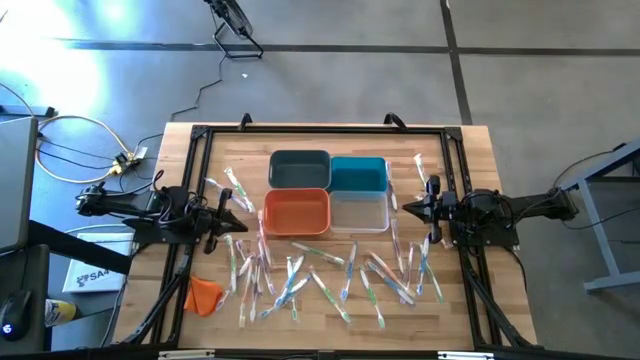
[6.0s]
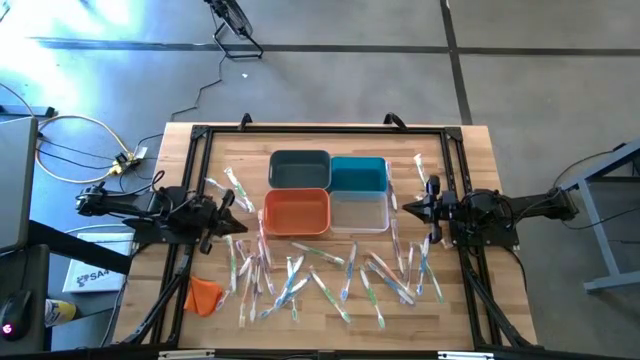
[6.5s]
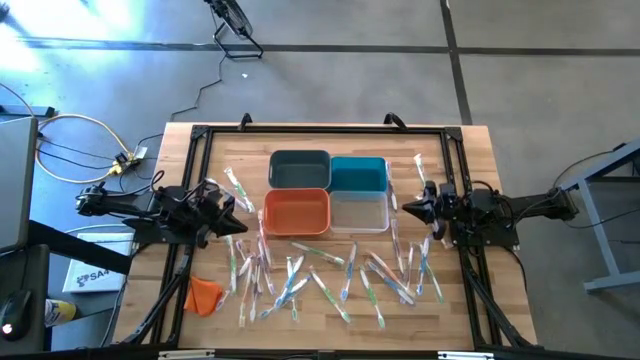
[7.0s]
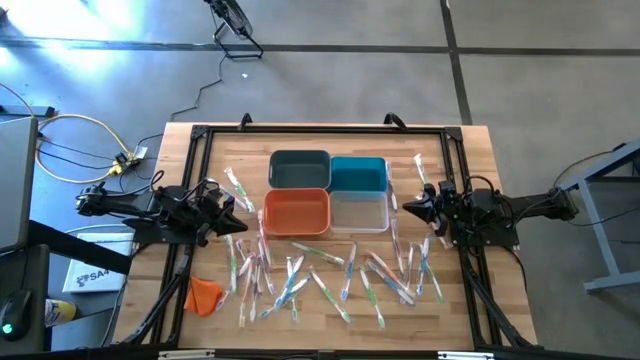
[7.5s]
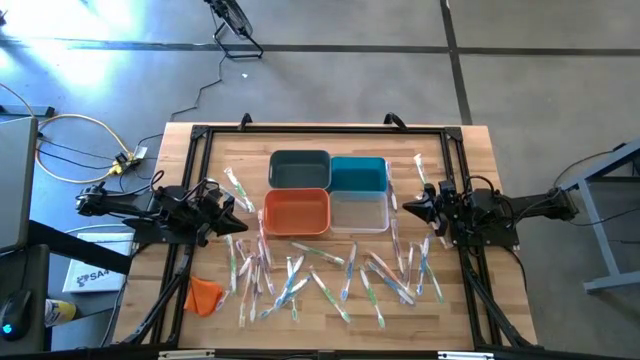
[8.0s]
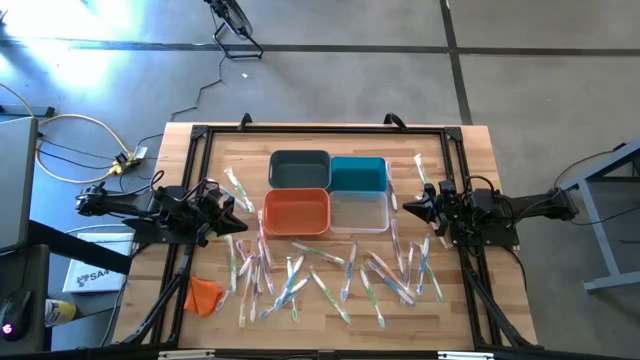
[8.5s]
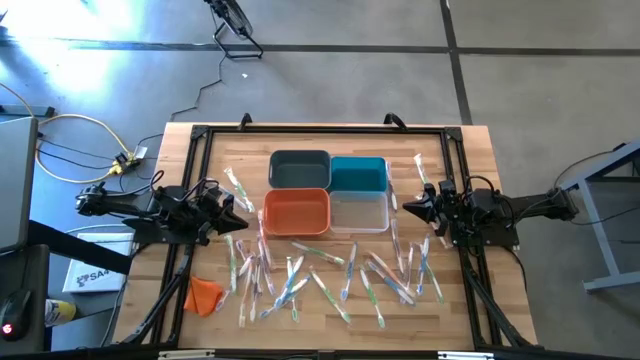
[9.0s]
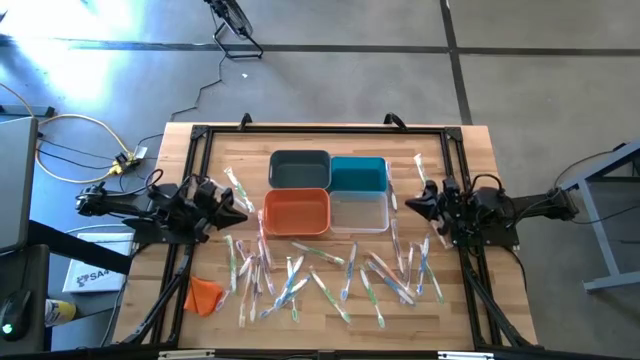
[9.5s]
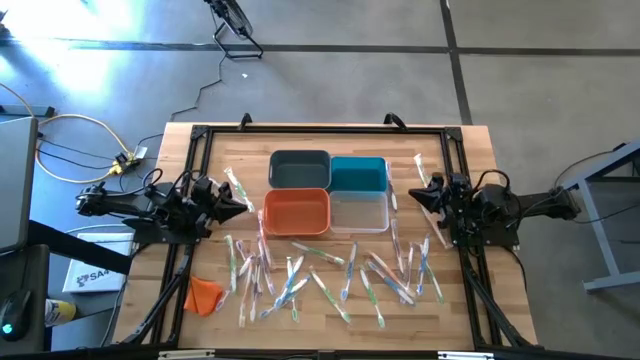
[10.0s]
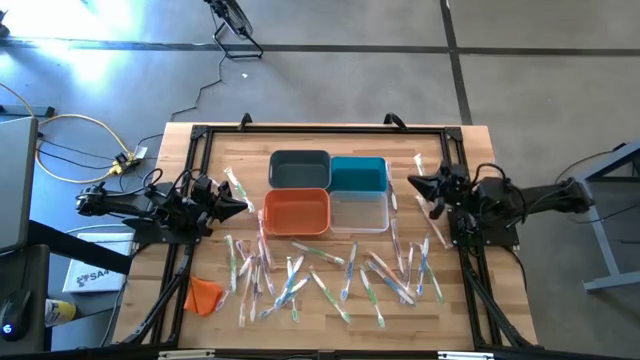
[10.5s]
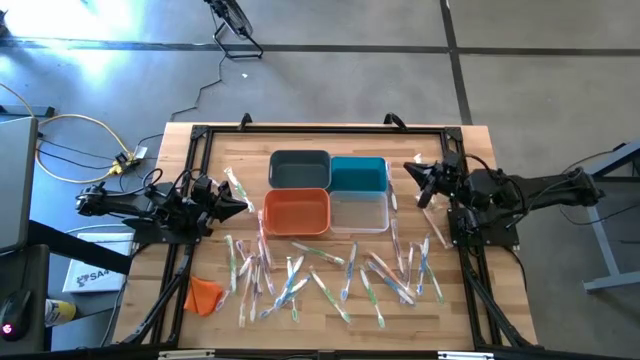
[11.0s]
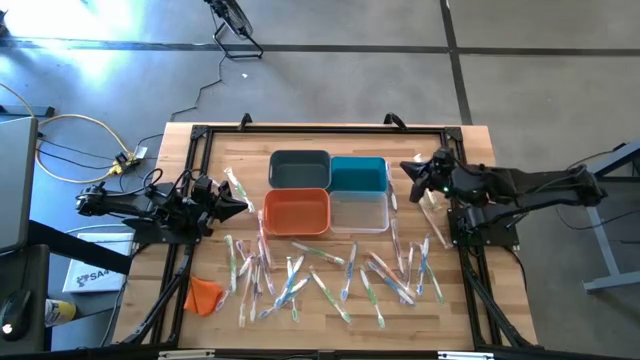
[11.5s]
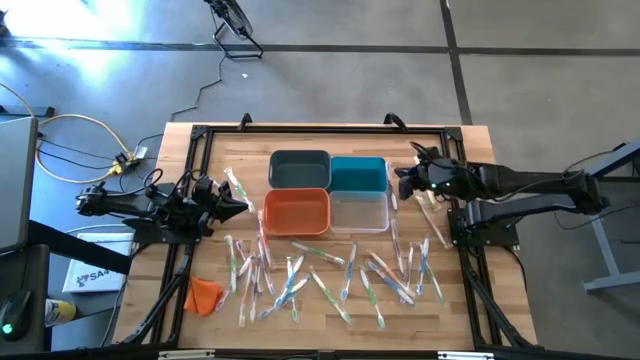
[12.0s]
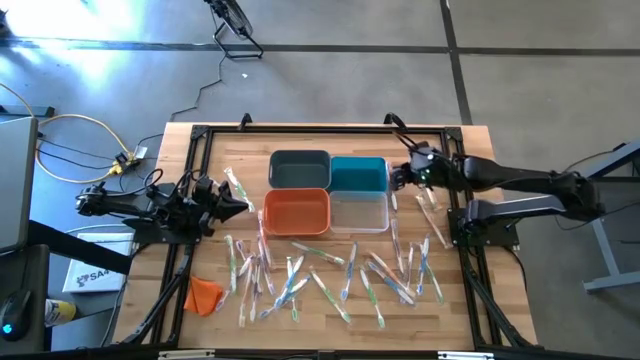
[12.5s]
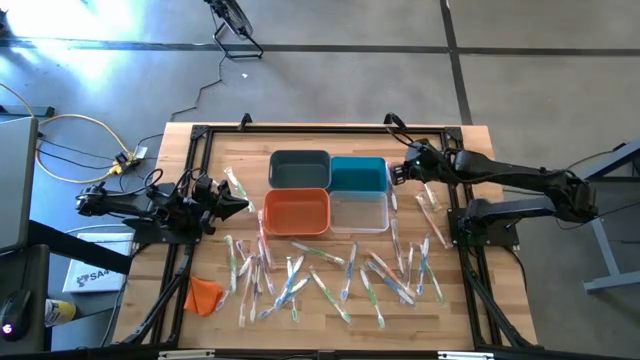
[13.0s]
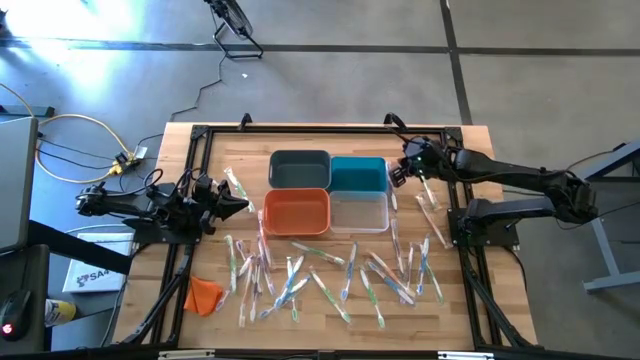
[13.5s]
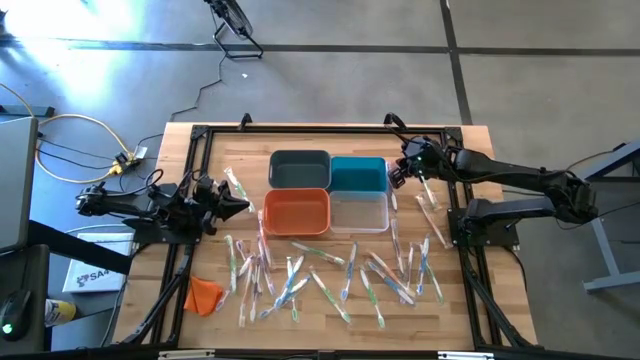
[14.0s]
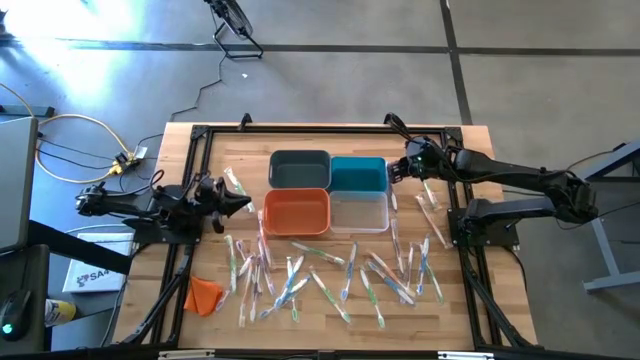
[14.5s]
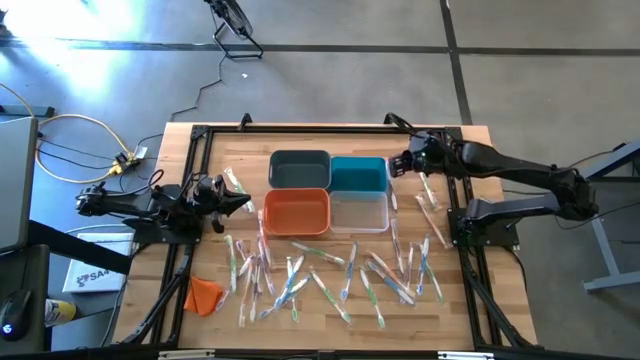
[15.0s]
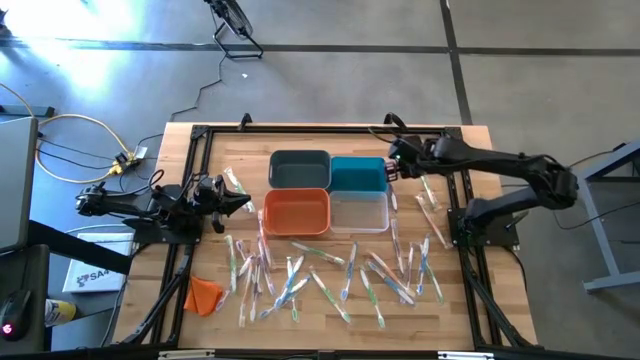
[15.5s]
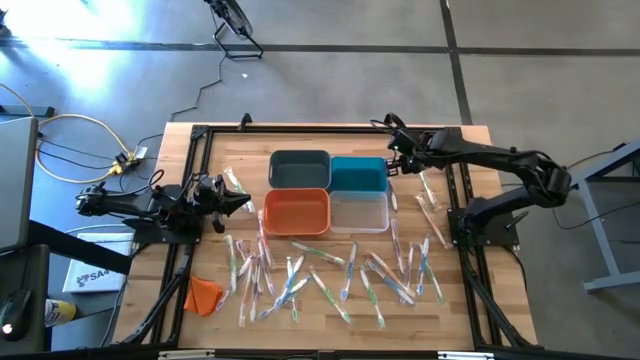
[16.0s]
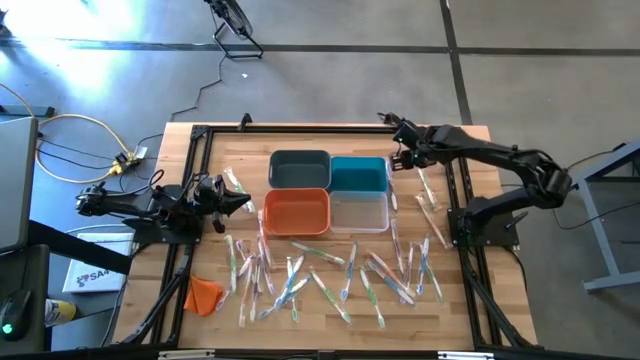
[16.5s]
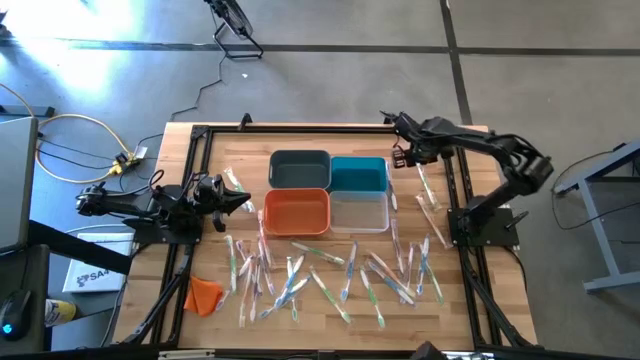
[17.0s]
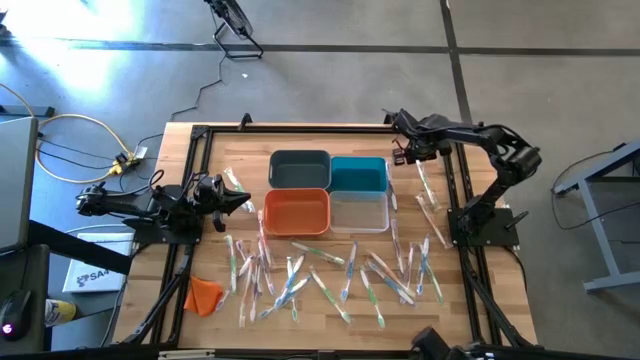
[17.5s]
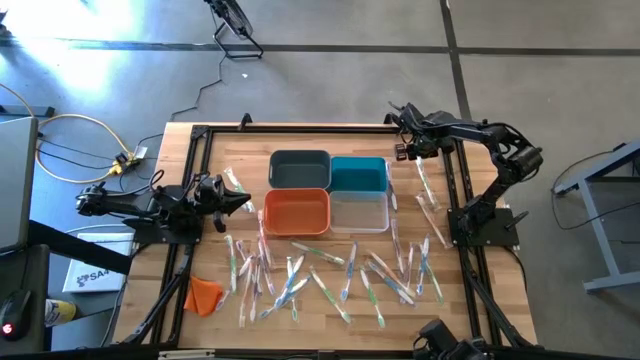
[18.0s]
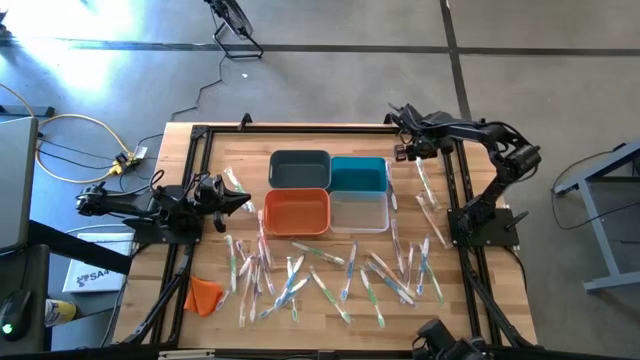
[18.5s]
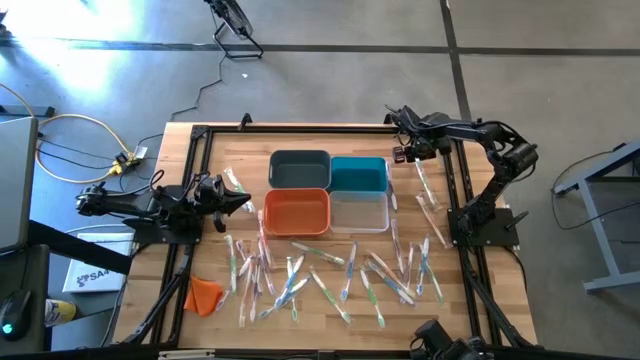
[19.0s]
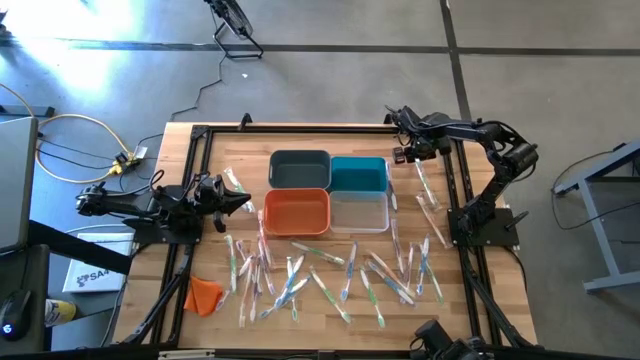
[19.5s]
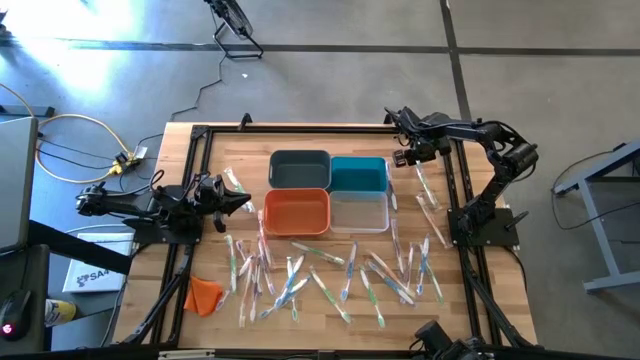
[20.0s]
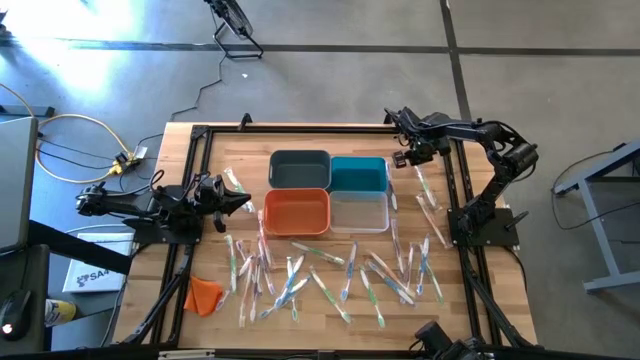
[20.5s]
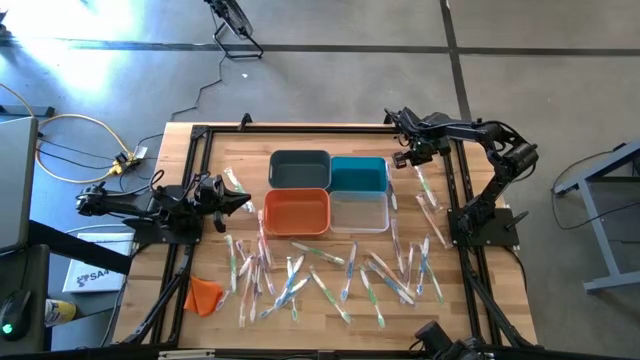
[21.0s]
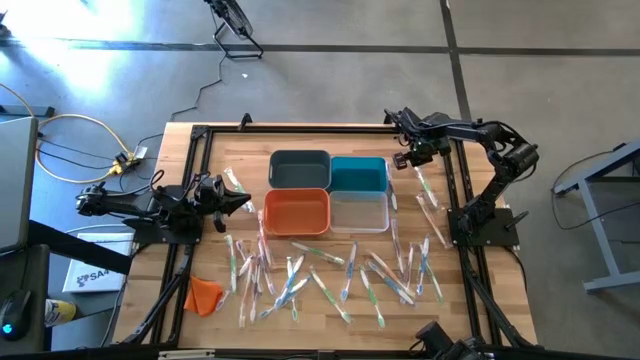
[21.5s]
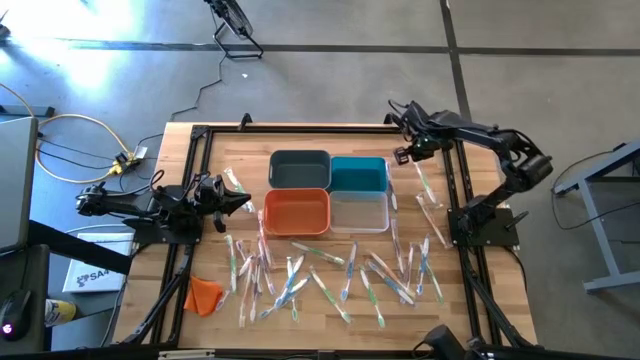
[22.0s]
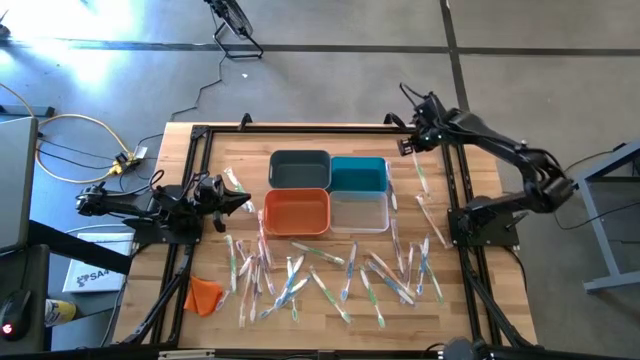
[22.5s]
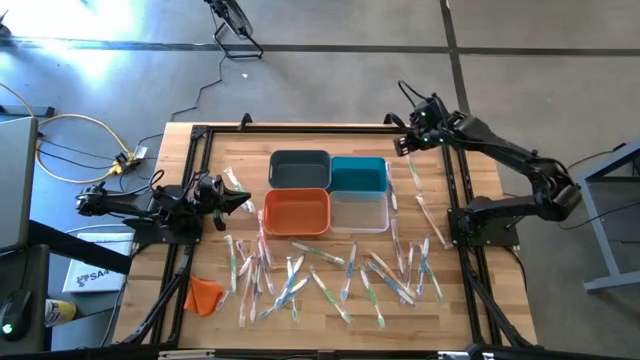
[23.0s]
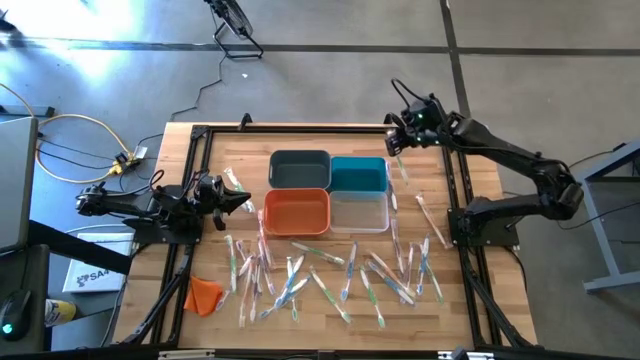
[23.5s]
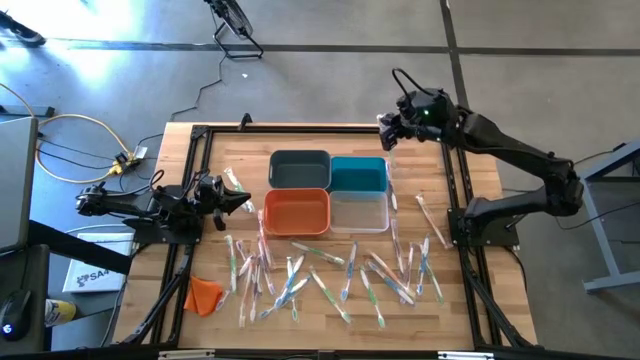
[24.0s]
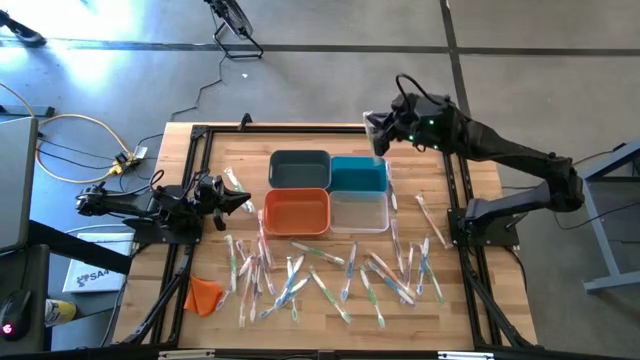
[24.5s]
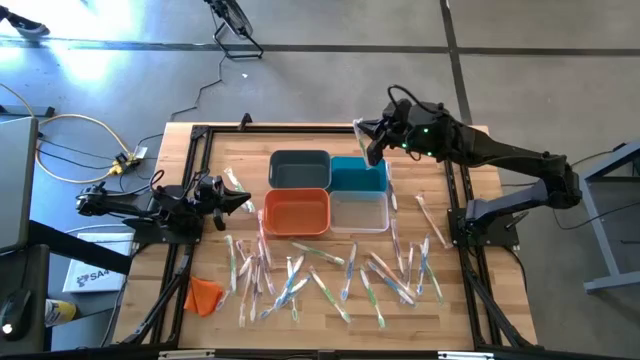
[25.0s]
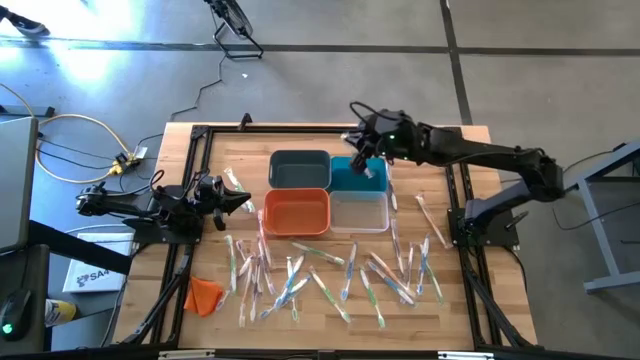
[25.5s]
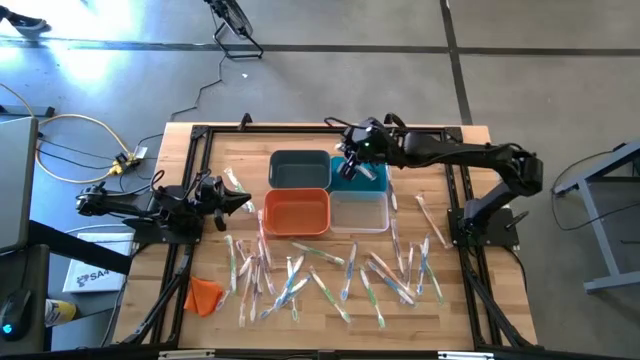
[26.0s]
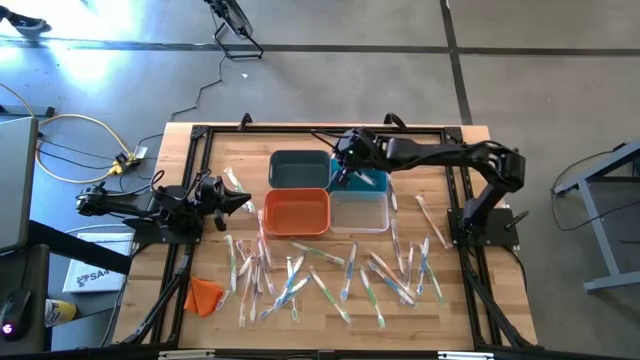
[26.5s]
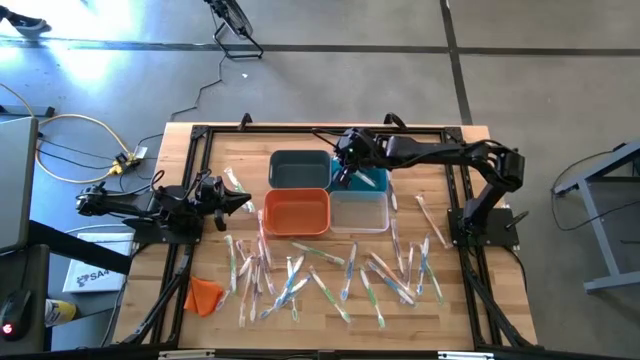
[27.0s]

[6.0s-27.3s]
Task: Pick & Place Toothbrushes
Put the green toothbrush into the right blue bin
